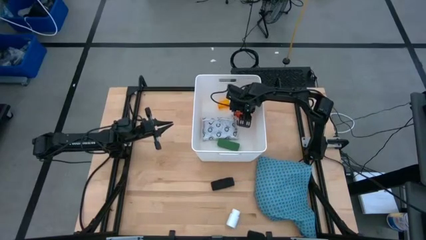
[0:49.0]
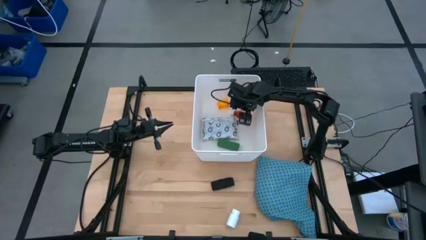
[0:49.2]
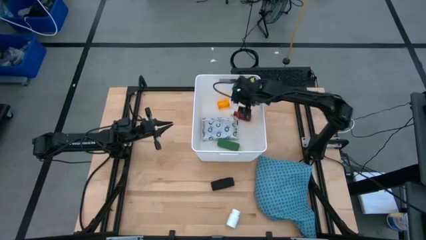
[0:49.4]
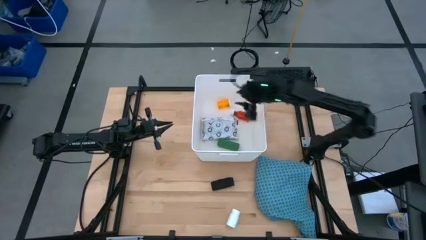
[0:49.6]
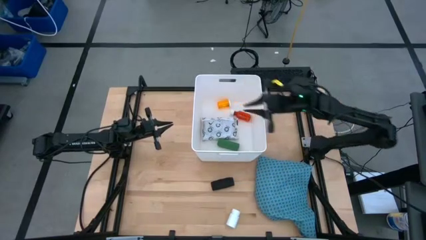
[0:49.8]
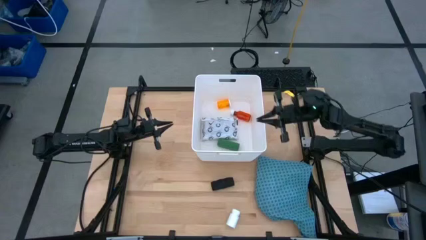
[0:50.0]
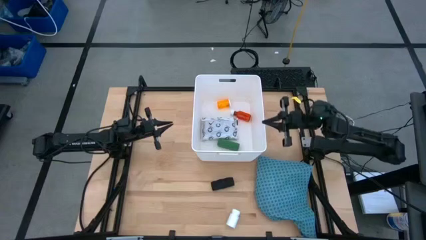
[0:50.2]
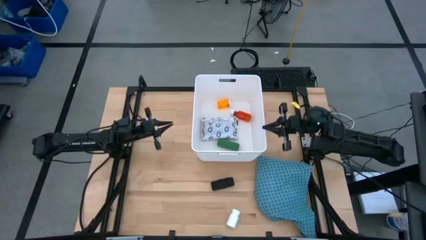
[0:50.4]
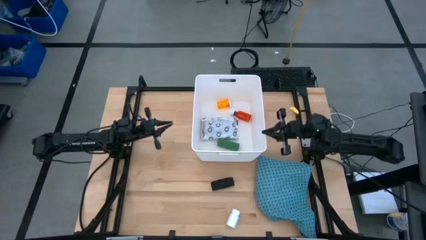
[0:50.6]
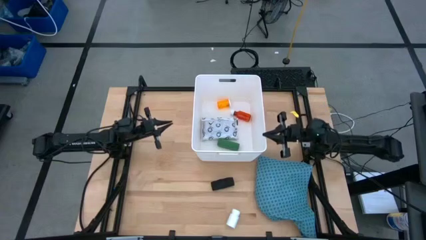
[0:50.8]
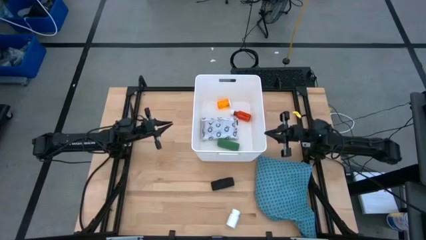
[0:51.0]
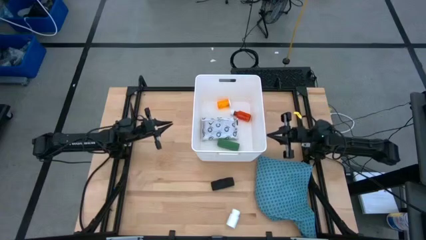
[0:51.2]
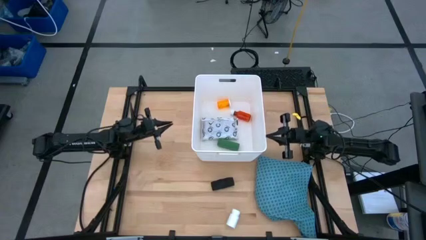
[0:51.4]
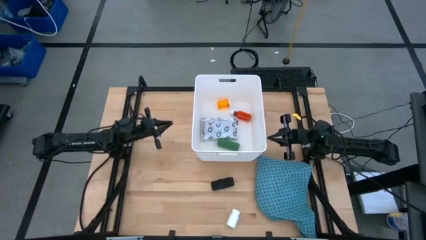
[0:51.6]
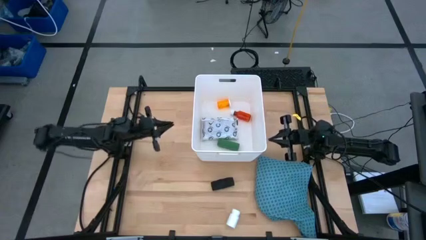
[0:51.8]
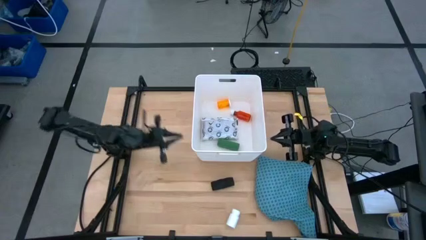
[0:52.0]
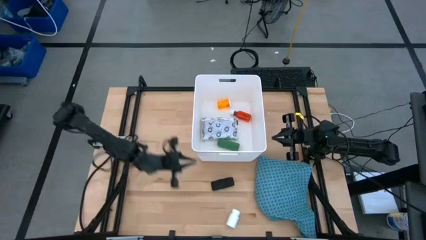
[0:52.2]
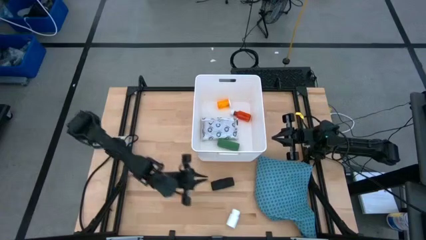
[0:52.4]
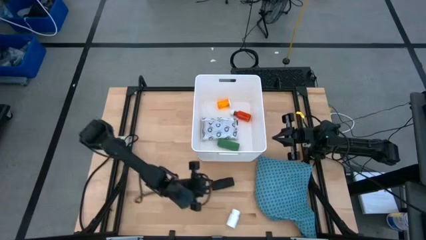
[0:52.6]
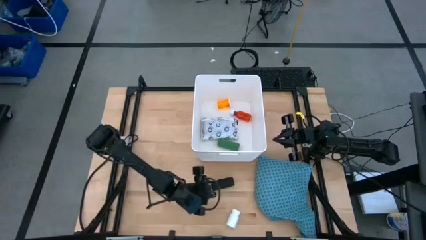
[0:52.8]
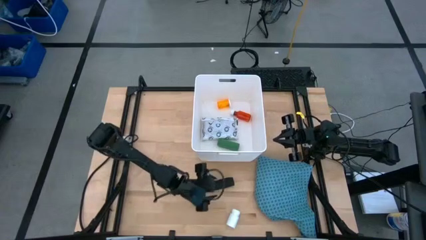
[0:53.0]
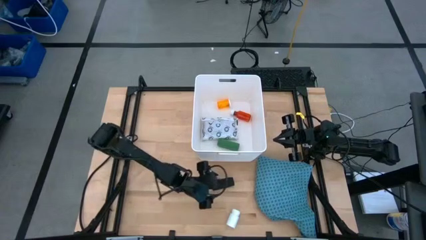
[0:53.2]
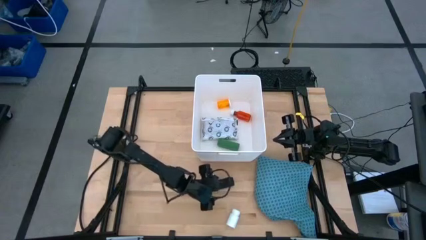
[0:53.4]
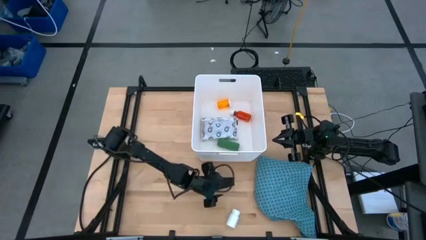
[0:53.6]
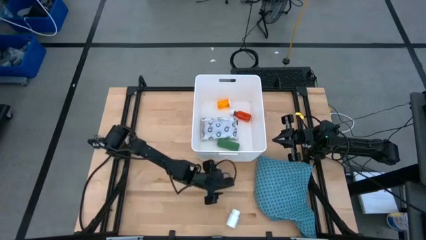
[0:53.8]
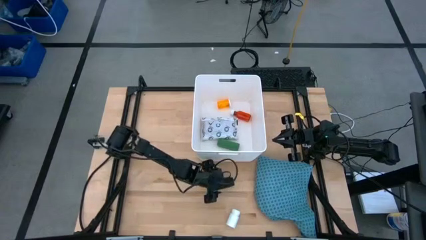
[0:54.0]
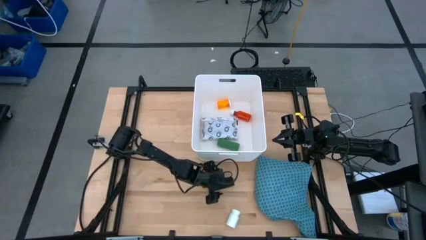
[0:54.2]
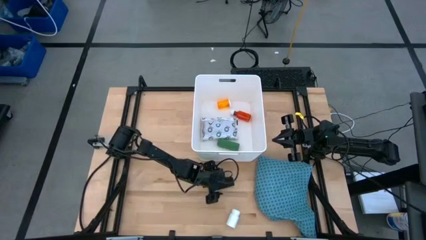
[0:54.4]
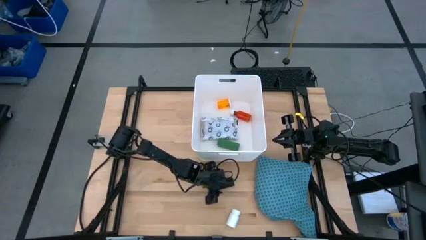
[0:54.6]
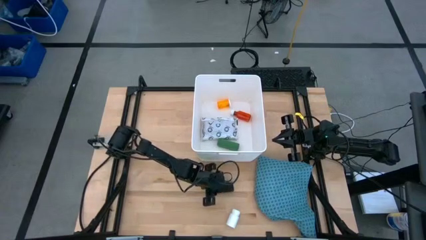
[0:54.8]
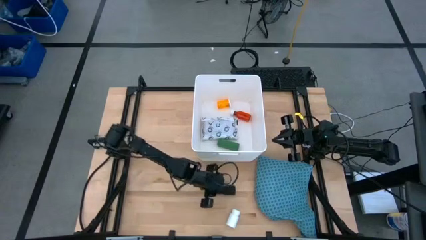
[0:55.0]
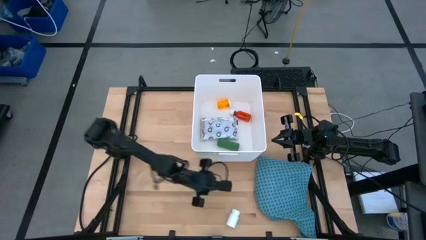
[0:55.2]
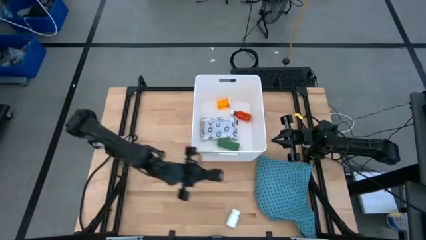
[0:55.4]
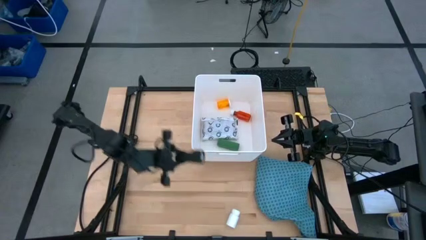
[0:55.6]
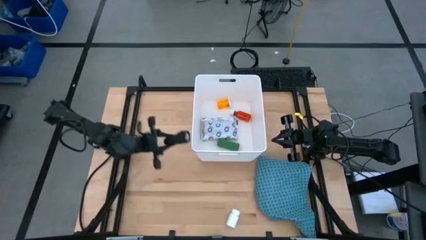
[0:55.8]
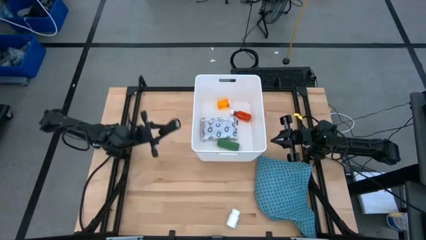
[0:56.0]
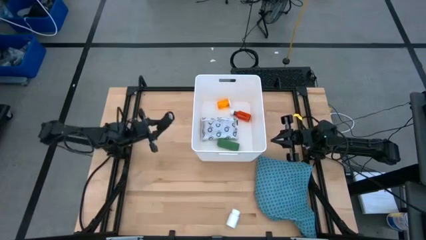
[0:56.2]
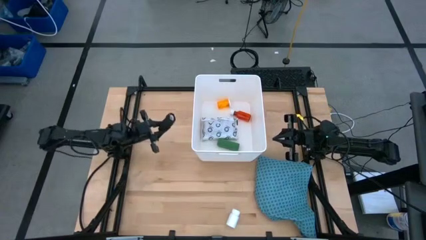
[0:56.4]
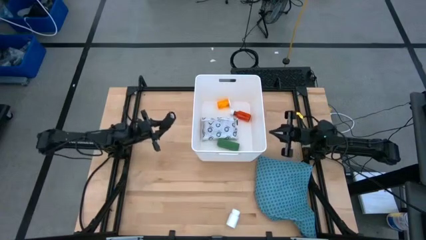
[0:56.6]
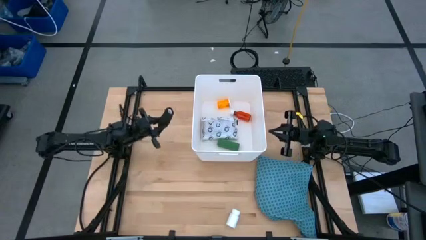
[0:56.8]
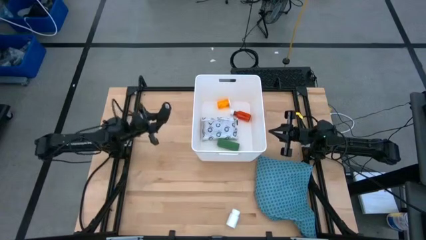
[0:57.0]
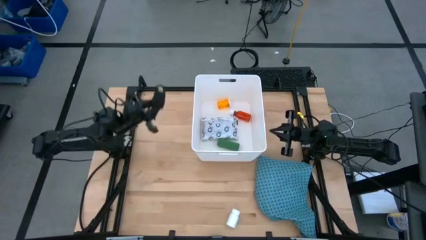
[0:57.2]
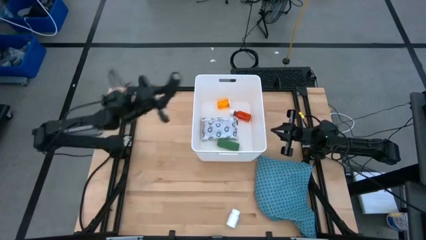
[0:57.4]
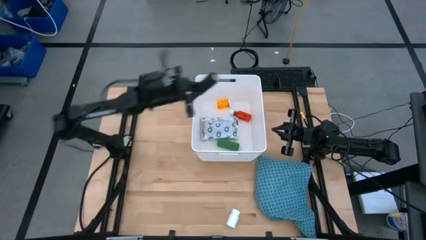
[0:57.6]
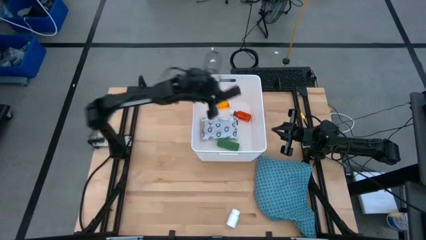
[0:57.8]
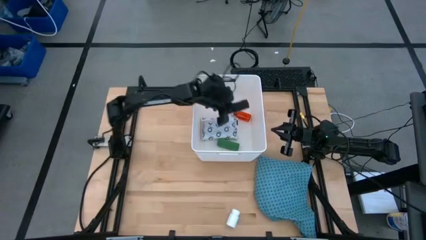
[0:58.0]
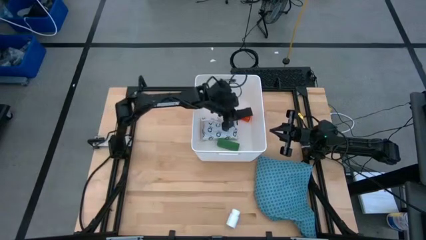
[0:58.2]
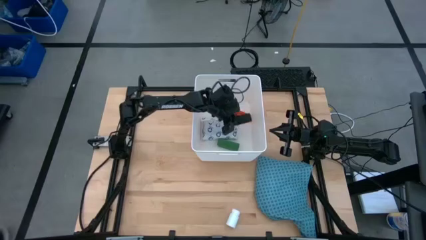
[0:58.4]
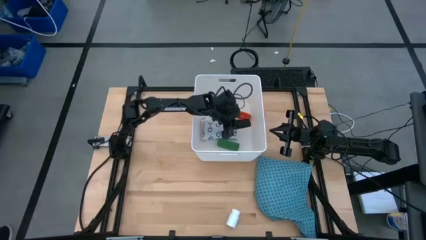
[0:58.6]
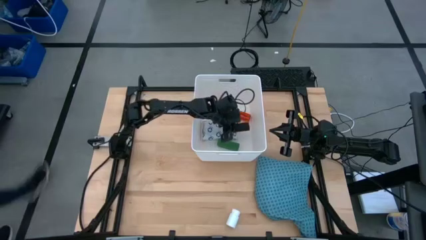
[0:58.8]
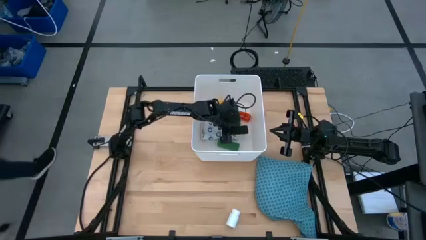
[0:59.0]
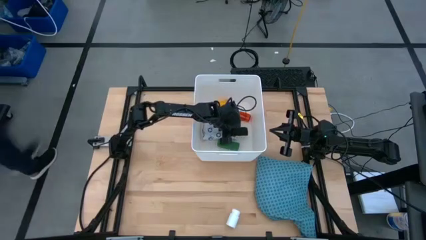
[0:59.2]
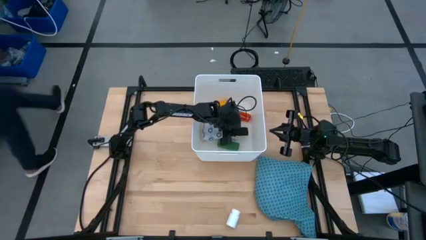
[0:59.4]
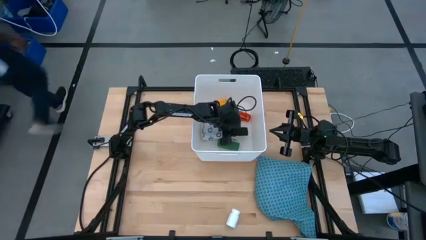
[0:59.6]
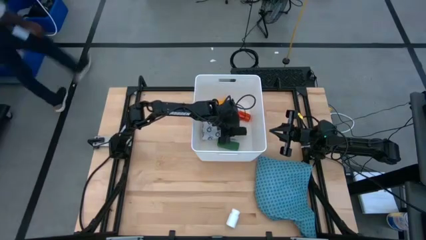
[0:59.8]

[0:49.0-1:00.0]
Task: Pick & place medical supplies in basket/bin
Put the black bandage into the white bin
